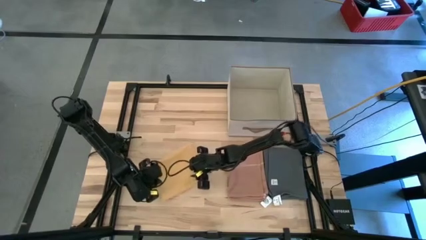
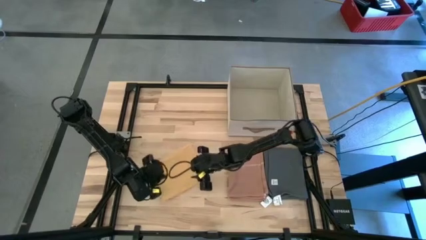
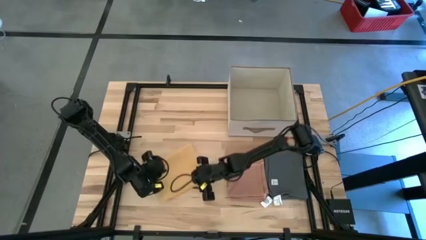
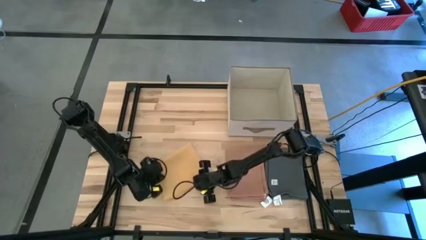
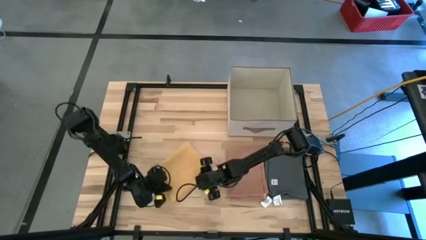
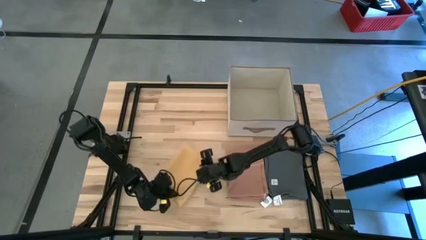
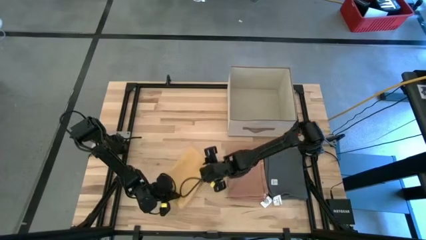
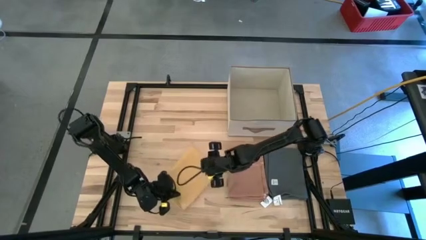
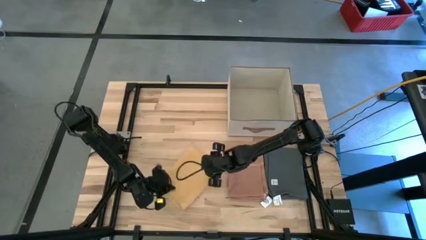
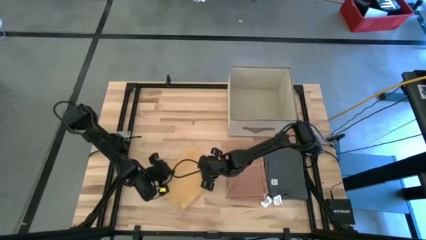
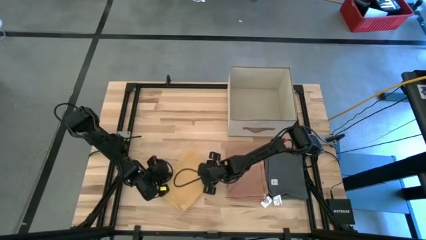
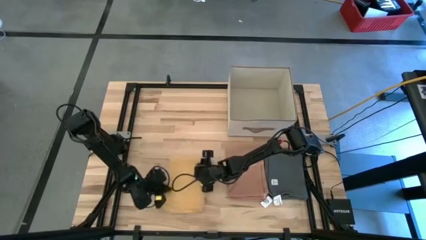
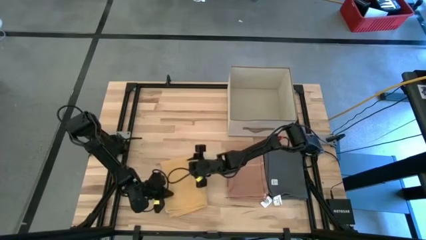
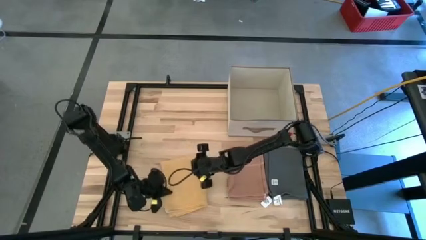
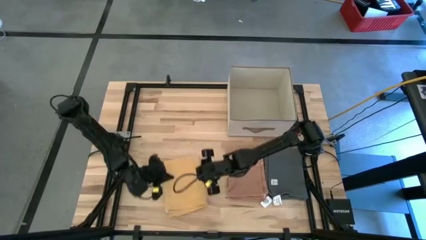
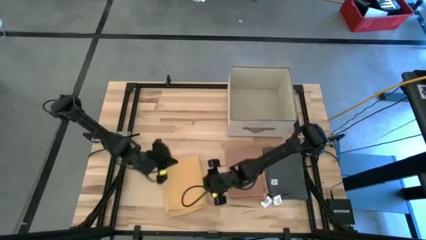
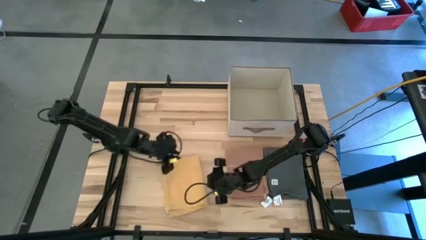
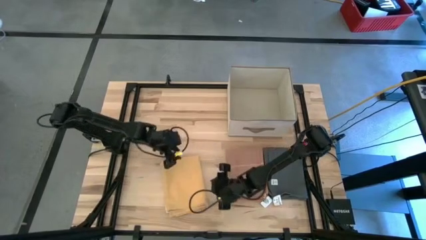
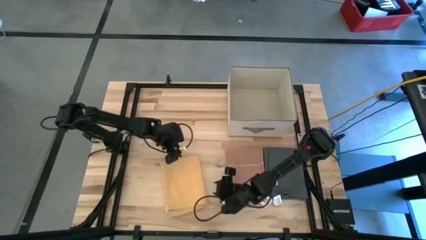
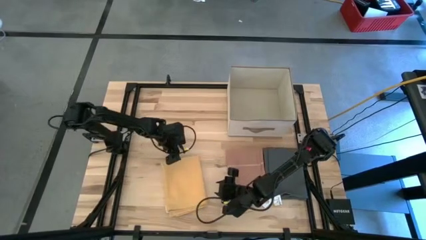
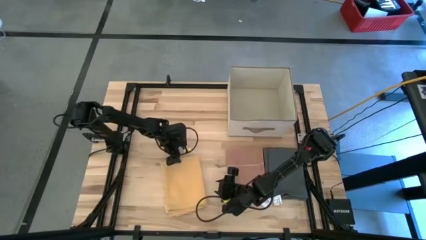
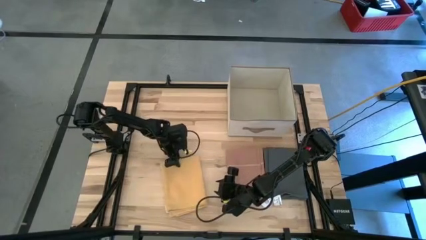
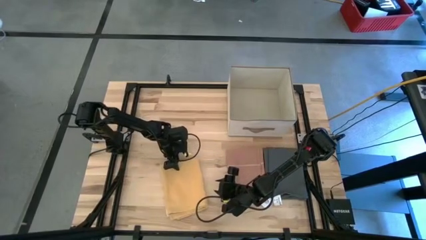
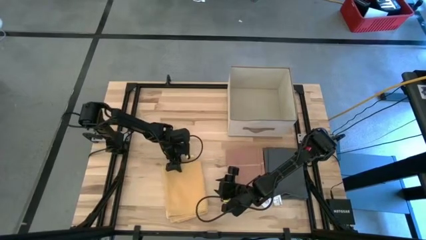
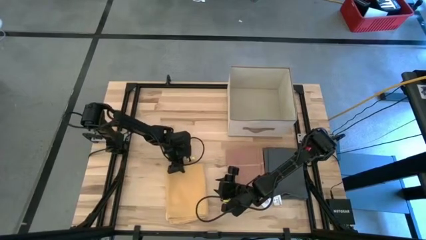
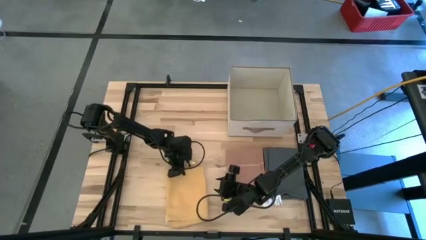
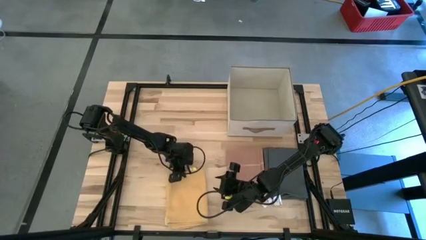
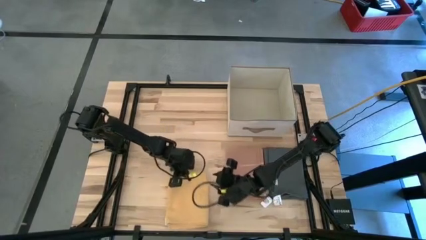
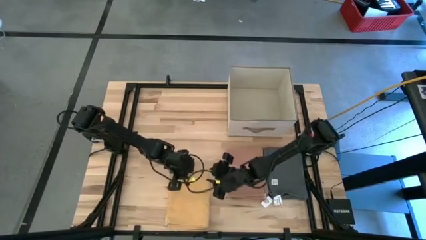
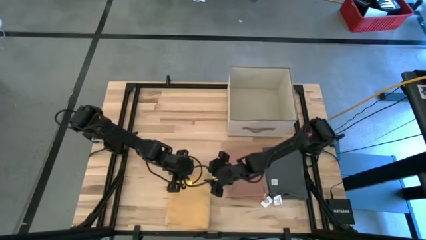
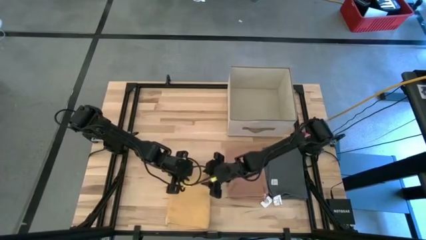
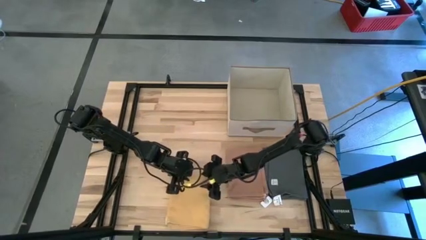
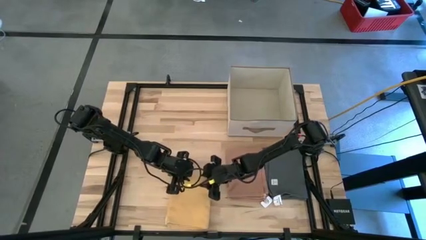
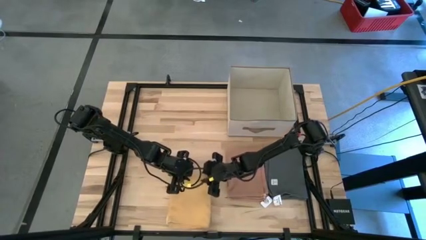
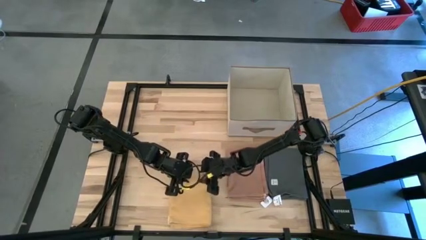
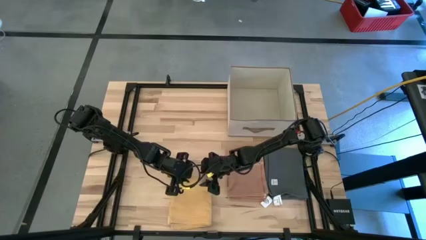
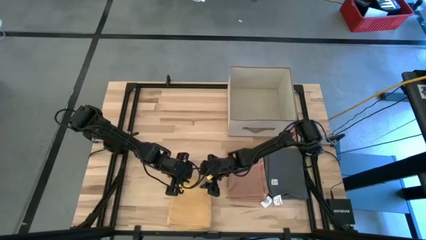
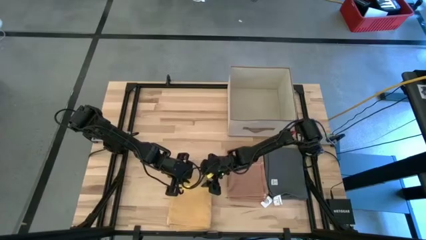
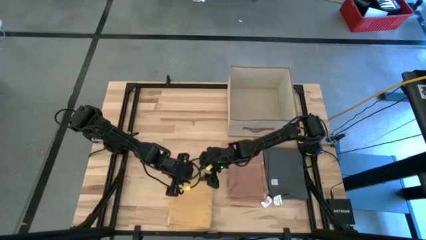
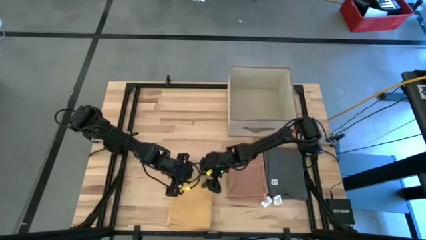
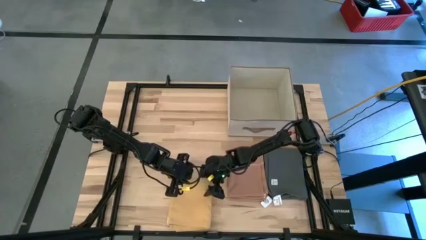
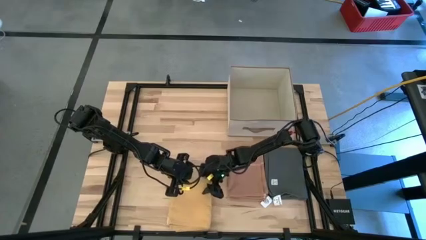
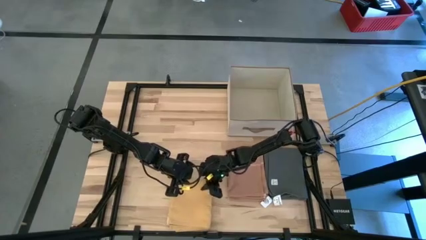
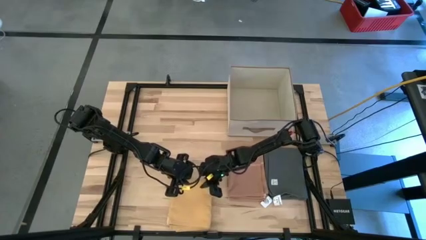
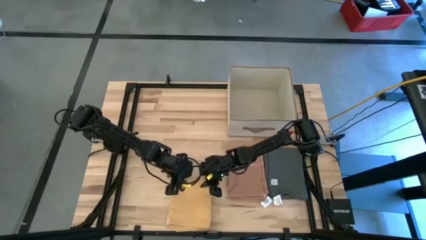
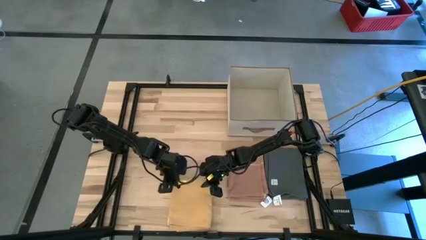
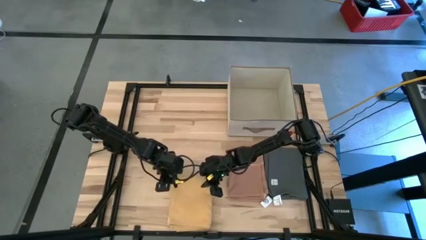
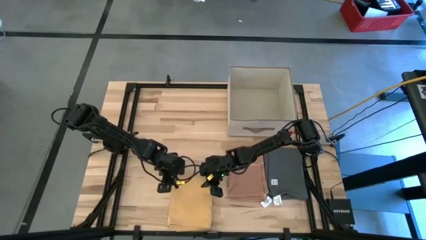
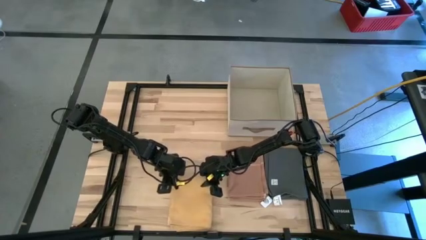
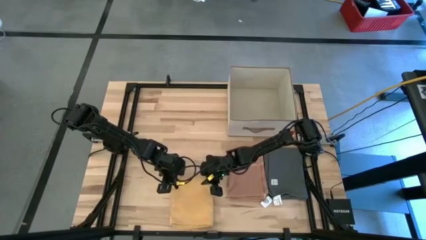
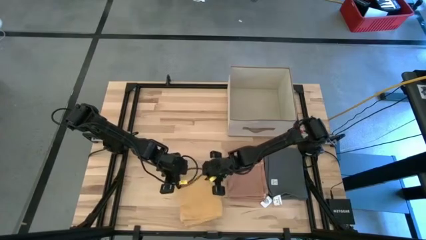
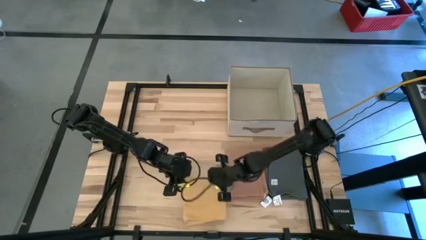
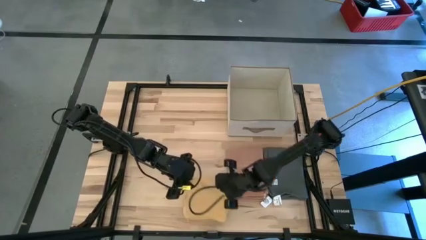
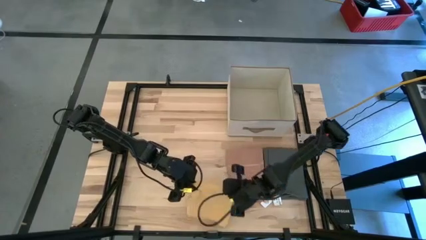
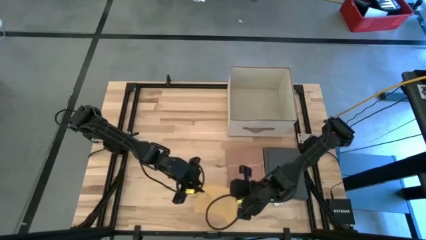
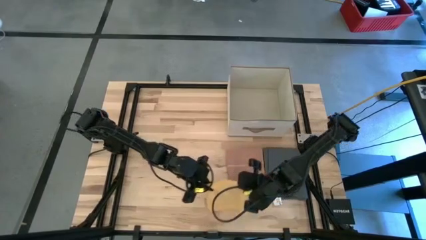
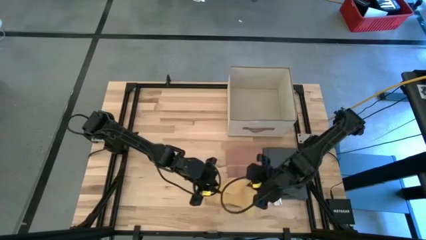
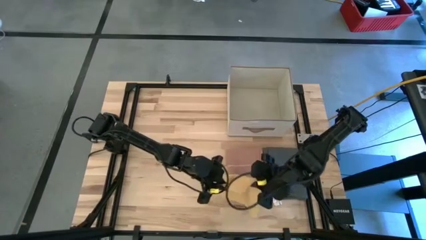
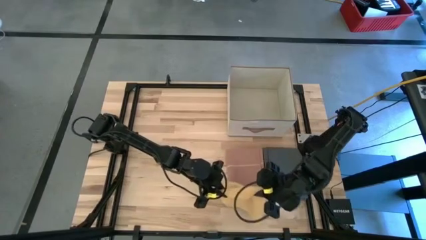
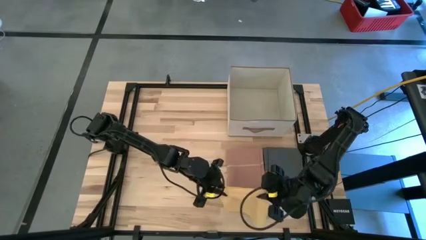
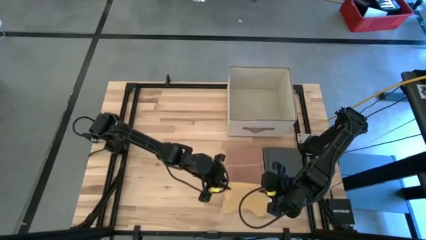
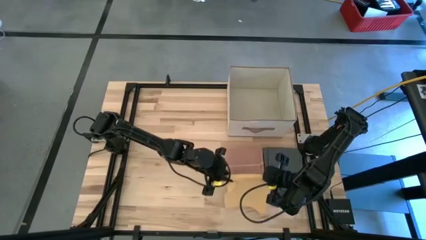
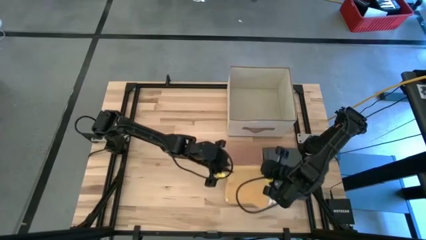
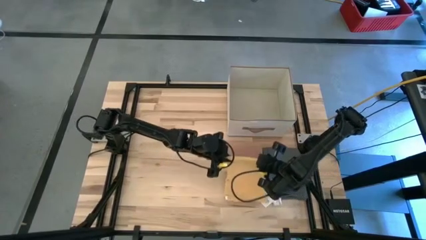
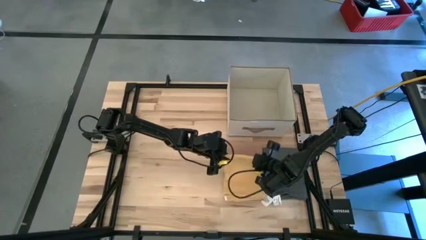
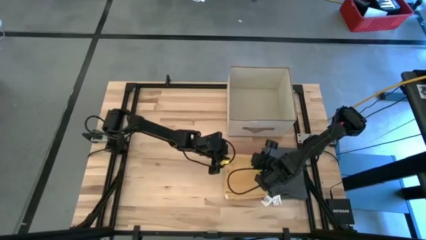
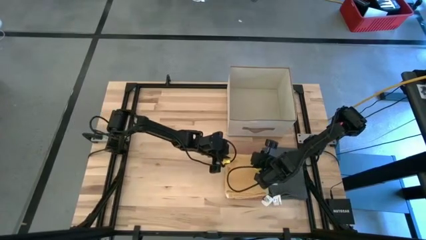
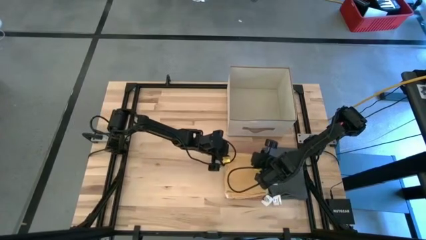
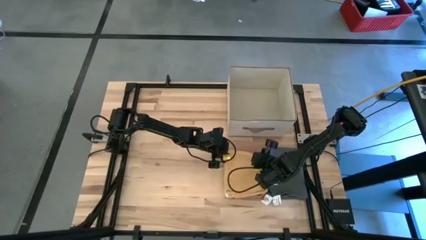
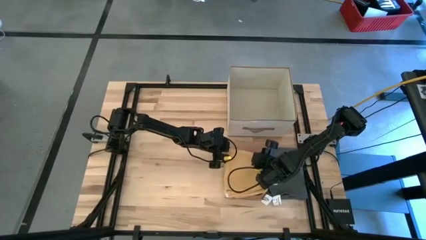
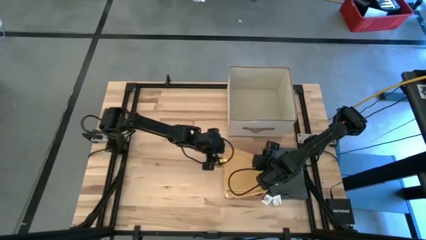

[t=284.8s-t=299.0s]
Task: Fold towel
Stack the yellow towel into the light orange towel

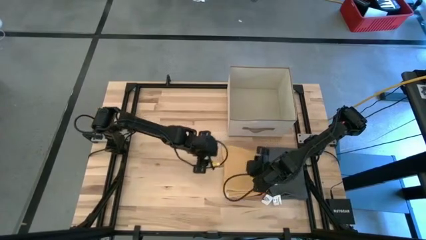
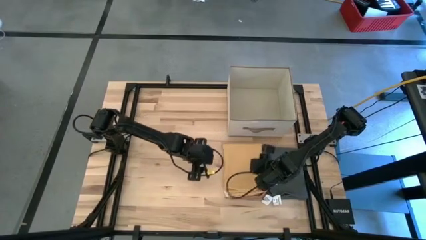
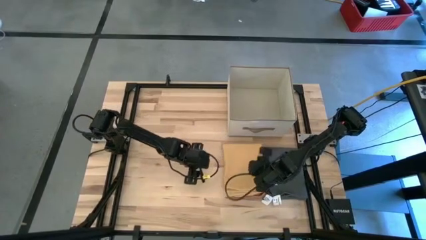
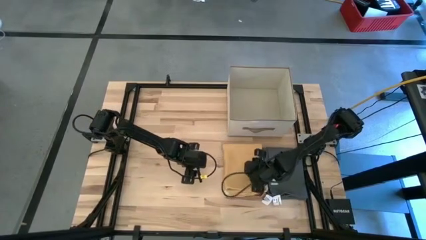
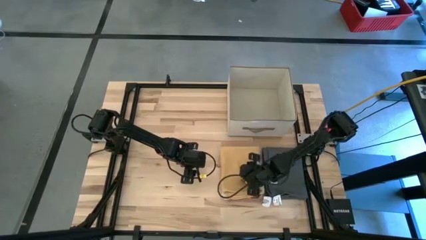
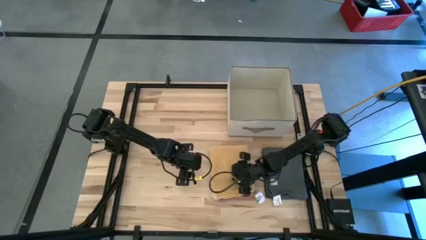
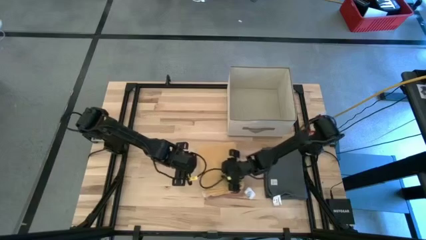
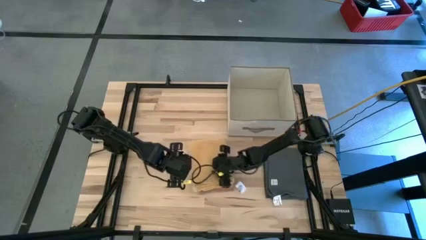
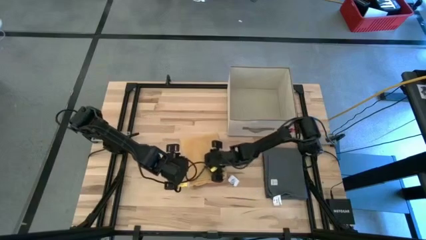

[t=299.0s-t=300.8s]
Move the stacks of towel to the center
